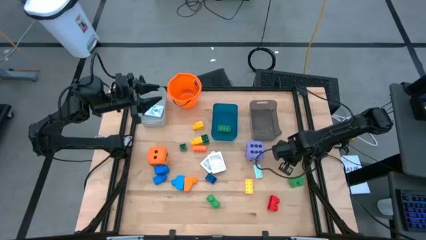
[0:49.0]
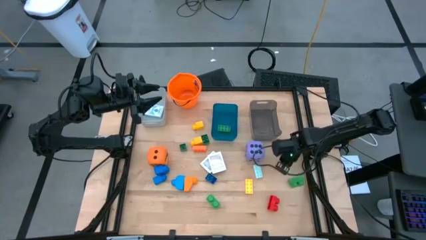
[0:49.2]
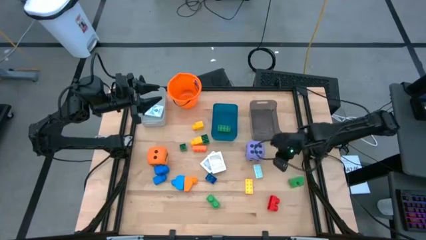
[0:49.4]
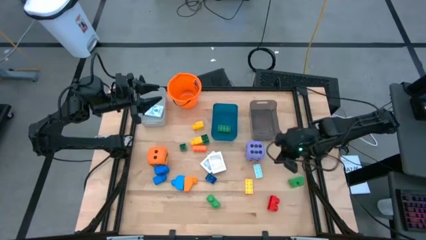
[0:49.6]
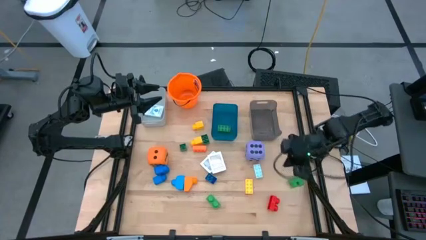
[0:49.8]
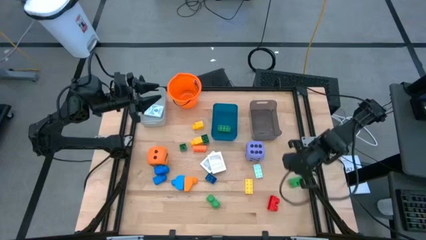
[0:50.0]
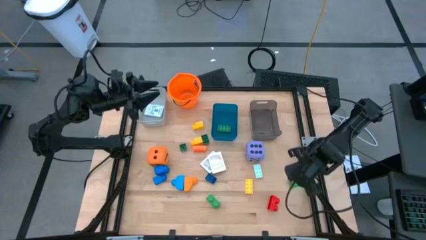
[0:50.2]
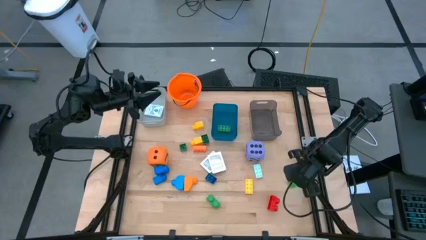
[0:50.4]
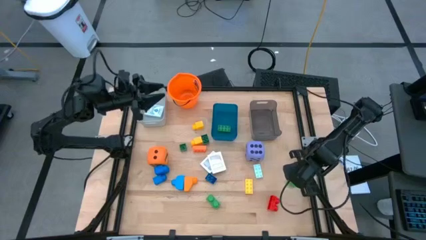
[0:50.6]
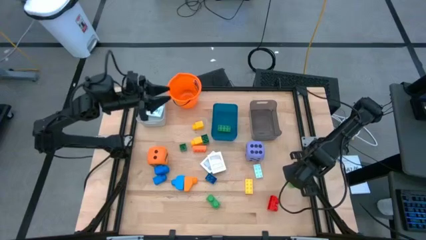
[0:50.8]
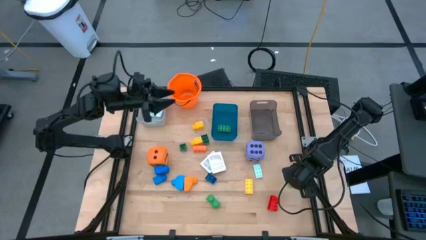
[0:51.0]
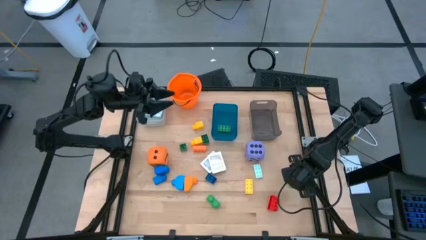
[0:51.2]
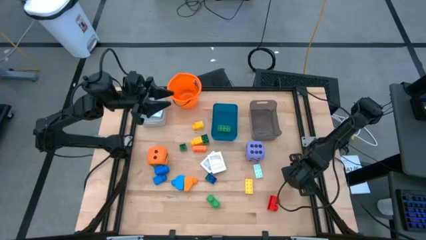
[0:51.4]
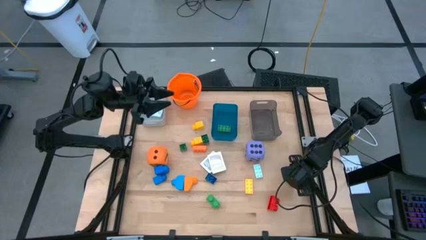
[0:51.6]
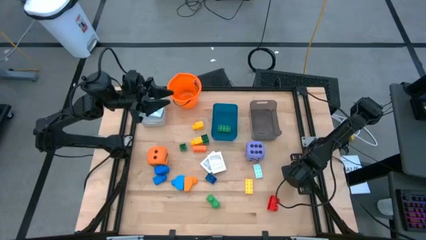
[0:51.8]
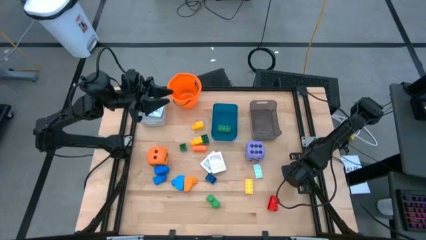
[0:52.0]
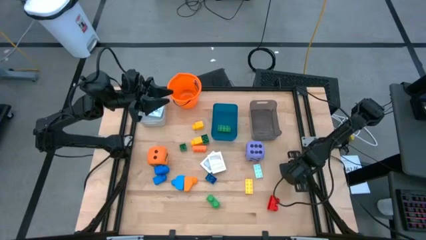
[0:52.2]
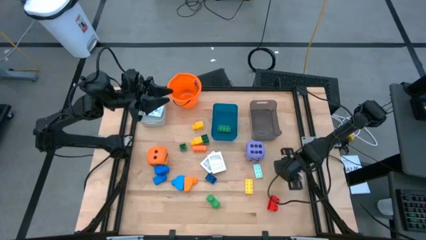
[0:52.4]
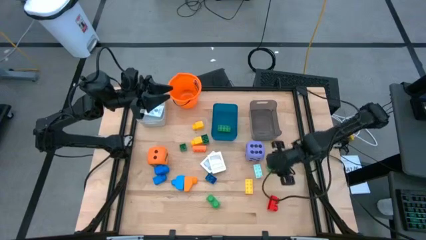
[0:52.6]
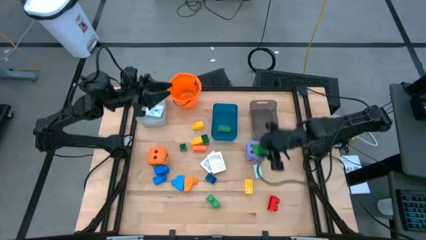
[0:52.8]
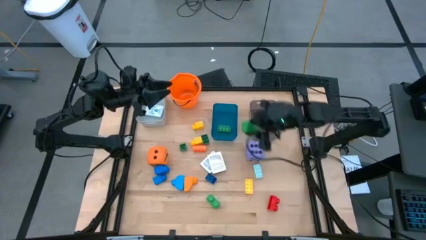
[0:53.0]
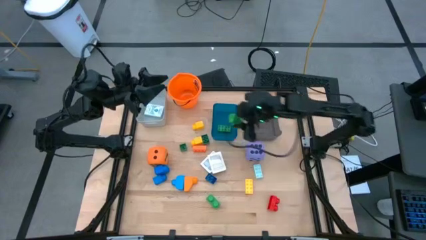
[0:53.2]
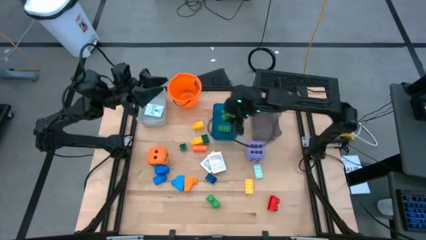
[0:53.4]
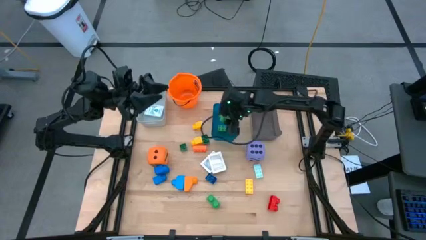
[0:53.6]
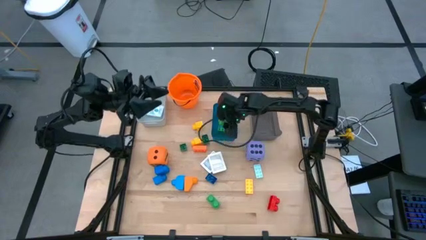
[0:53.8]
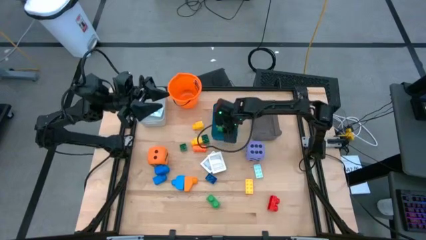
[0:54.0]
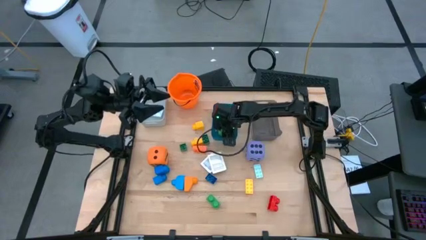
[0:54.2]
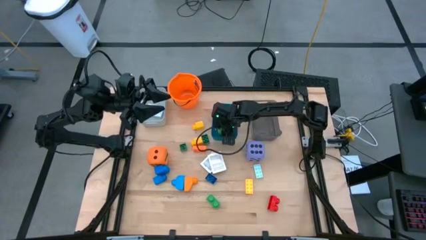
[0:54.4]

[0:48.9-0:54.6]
Task: Pick & Place Toys
Put the green game piece into the blue bin

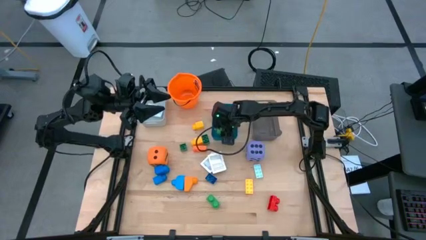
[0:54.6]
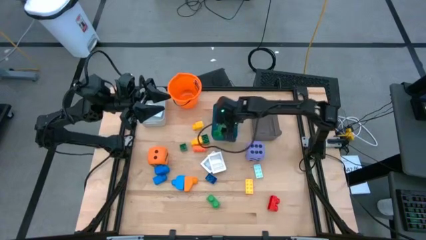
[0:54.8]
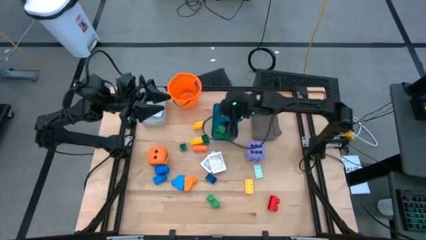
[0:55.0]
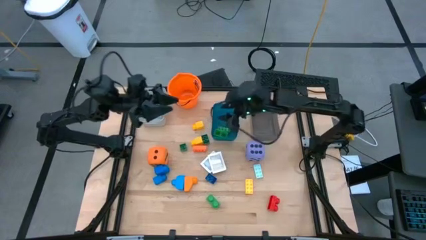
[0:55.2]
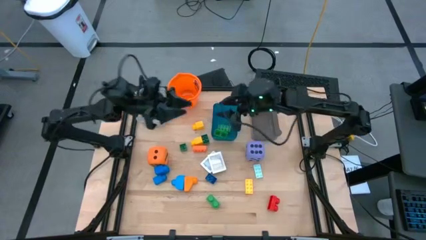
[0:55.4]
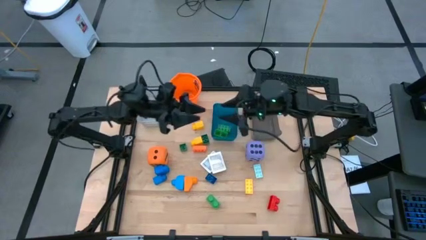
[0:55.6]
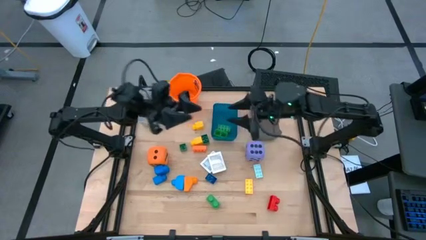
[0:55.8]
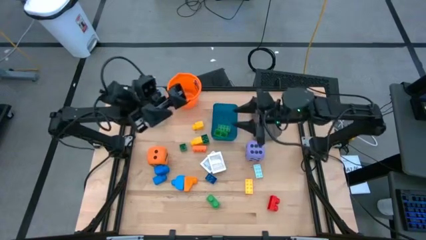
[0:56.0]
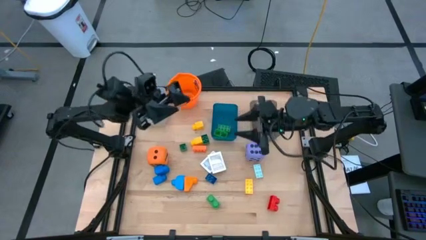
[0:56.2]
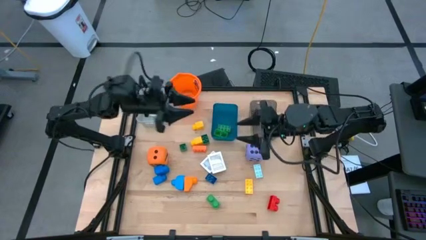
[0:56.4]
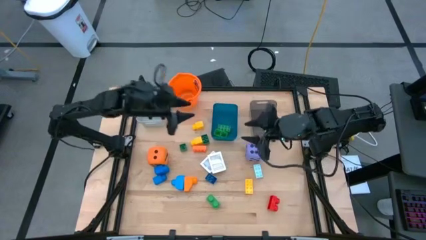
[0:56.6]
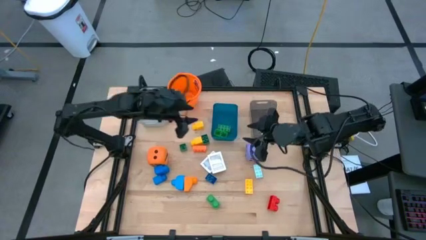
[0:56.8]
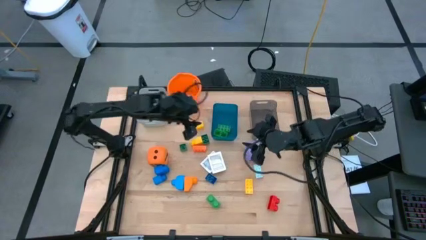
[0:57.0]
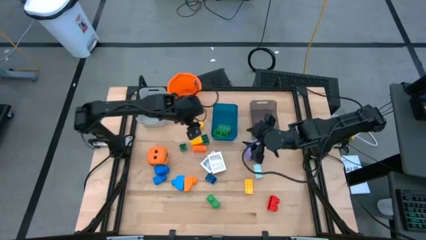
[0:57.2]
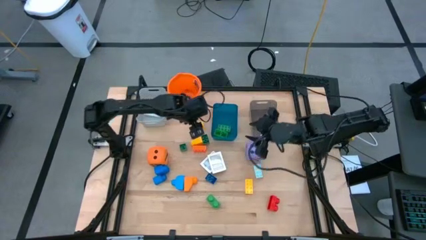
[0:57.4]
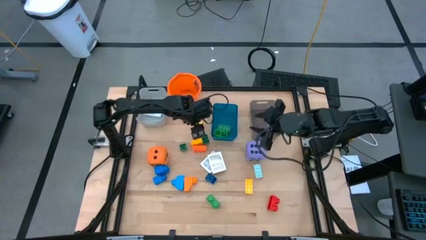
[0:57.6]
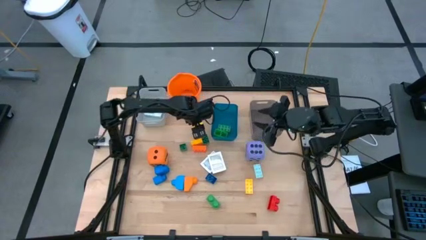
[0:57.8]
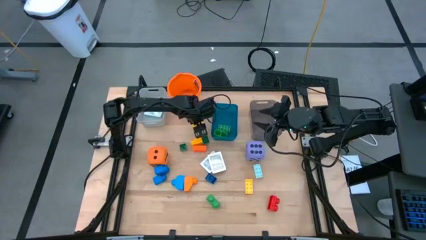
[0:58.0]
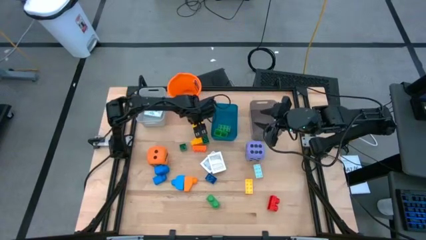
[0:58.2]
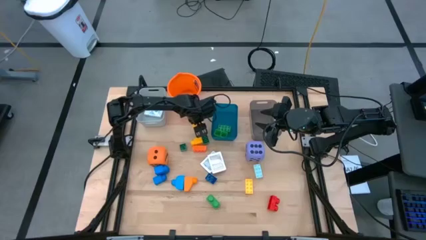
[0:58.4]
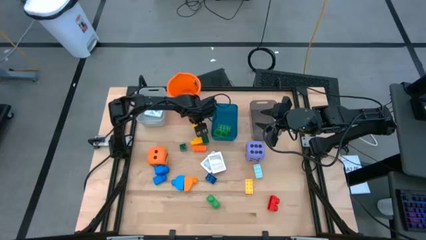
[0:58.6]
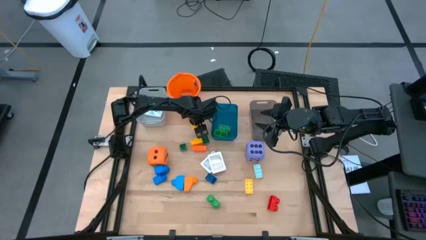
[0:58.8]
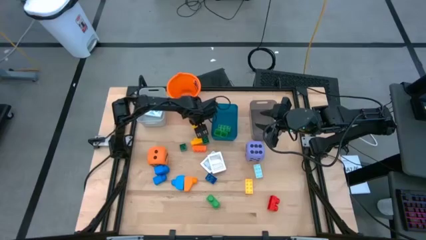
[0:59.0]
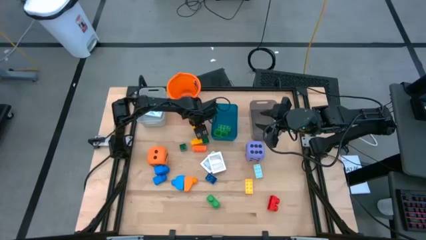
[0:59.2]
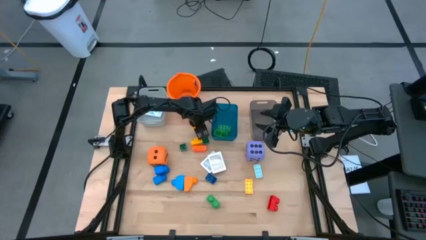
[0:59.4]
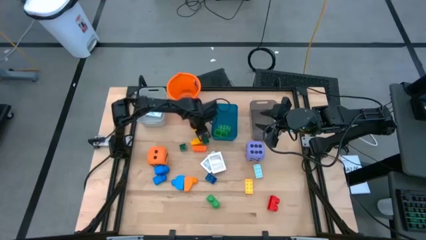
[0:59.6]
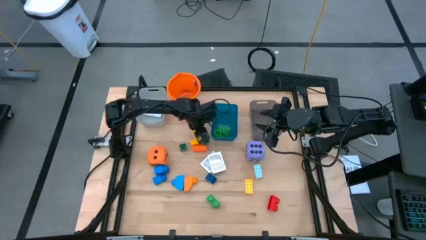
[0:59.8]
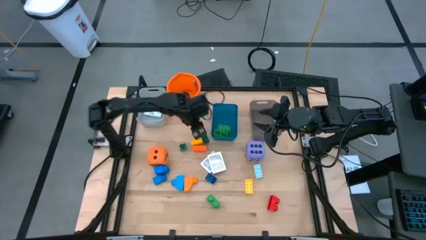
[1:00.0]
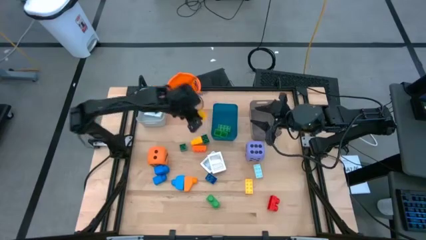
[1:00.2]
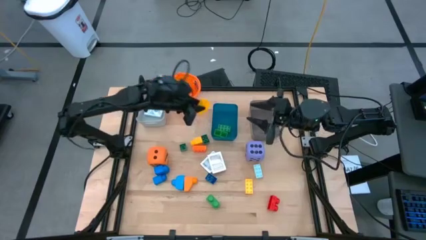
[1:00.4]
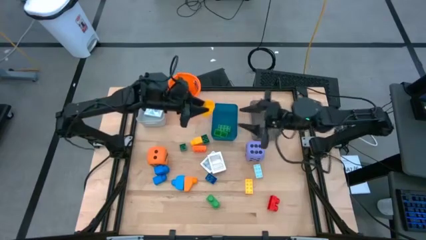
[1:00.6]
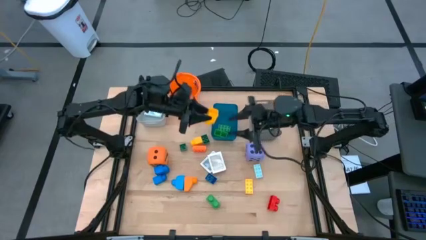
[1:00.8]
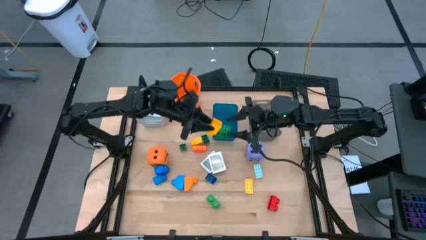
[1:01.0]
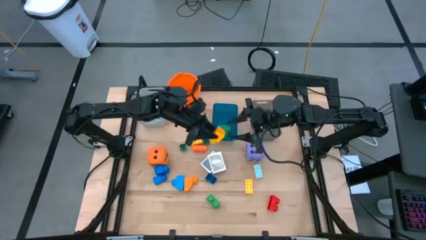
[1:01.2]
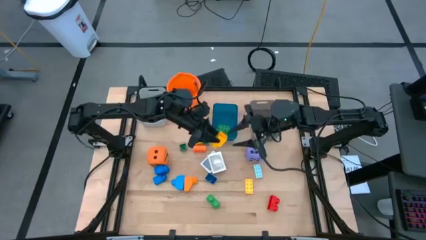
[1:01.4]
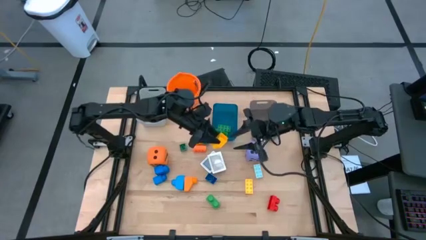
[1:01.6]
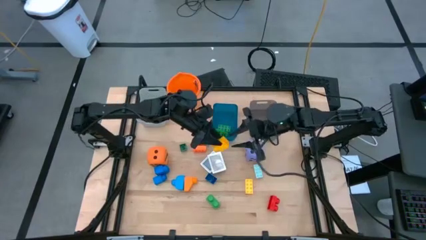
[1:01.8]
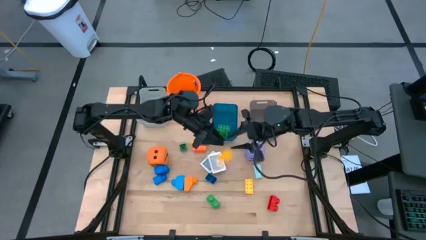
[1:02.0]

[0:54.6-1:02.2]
Put the yellow game piece into the blue bin

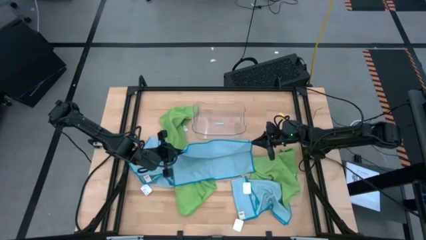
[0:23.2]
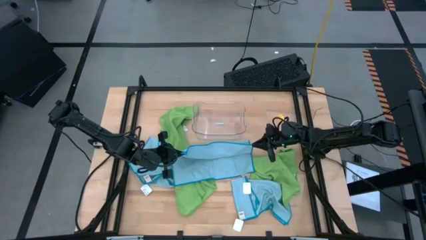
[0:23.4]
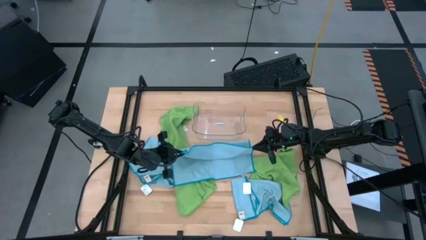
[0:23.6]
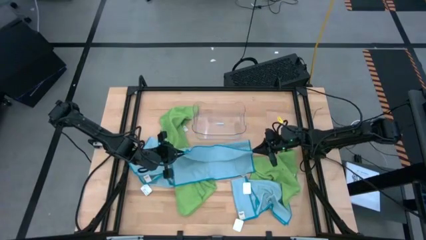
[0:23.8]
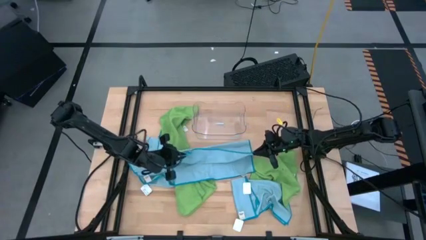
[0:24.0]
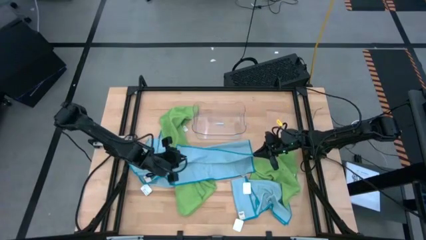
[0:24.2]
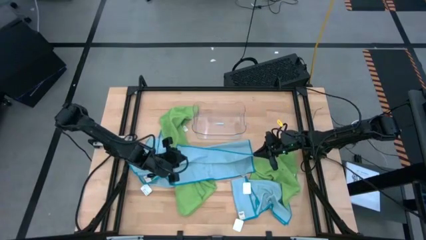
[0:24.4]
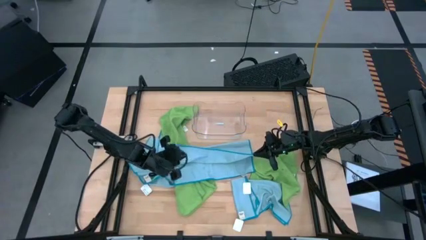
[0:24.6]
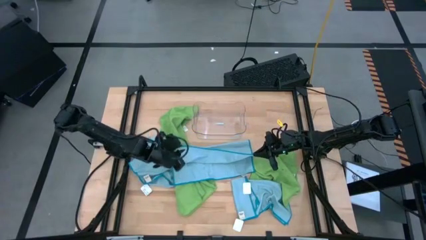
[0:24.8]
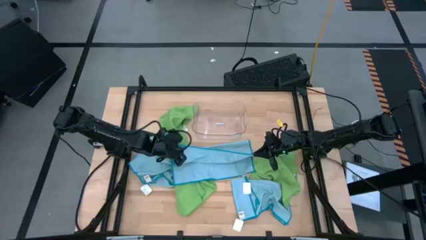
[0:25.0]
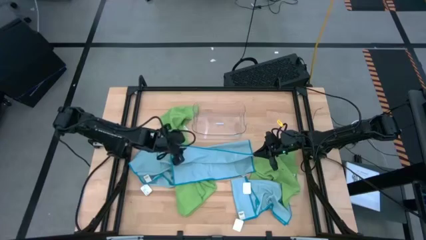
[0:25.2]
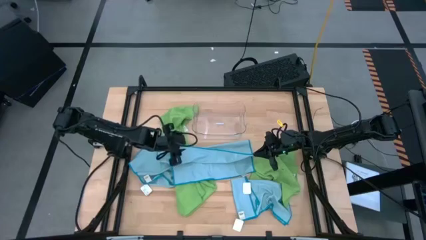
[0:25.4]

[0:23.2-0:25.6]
Task: Fold microfiber towels
Fold the top right blue microfiber cloth
